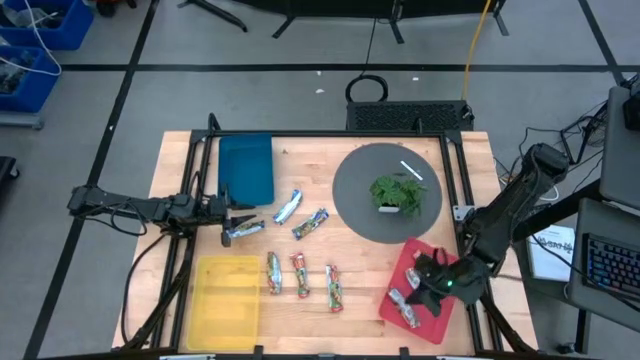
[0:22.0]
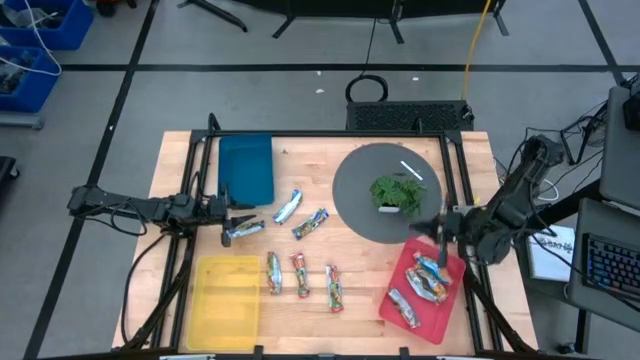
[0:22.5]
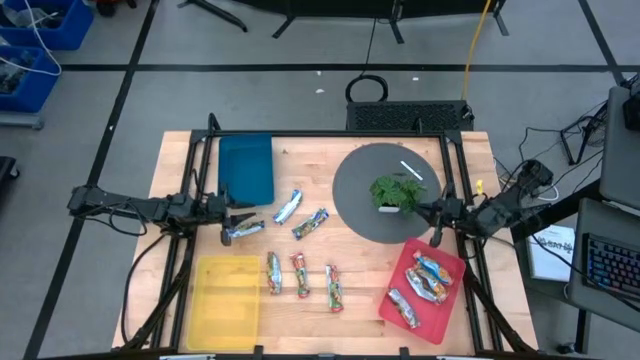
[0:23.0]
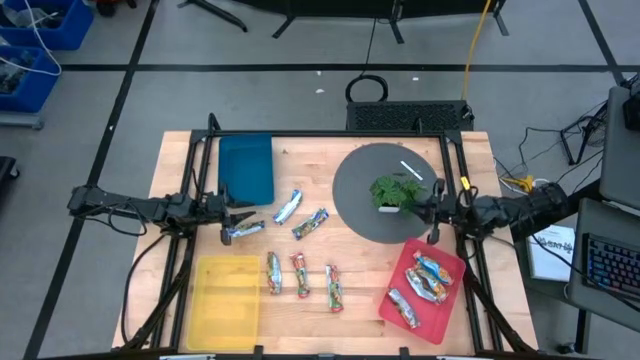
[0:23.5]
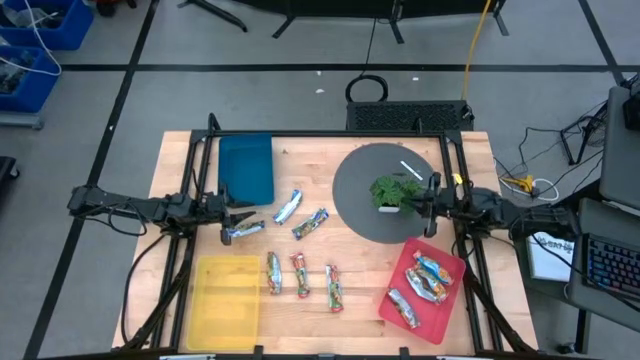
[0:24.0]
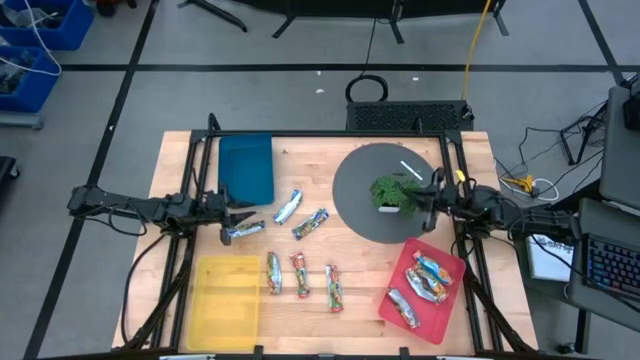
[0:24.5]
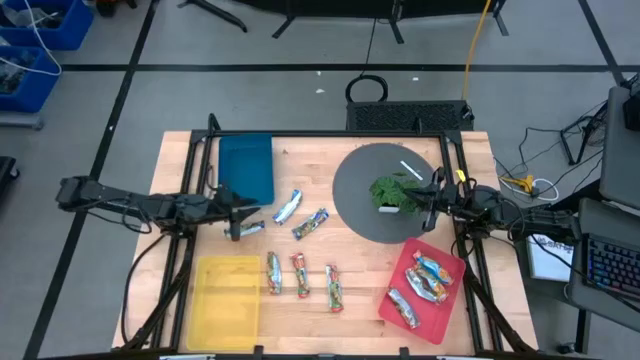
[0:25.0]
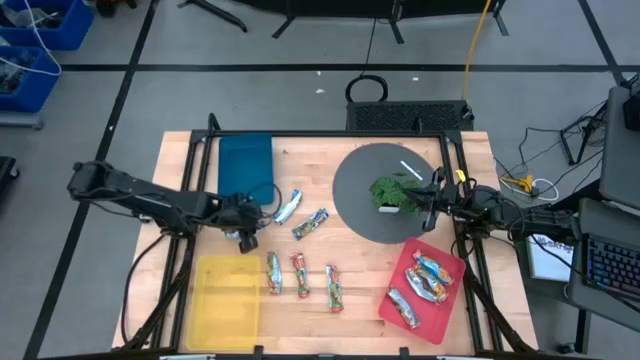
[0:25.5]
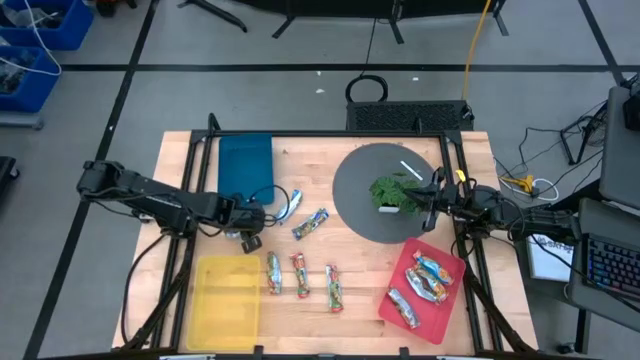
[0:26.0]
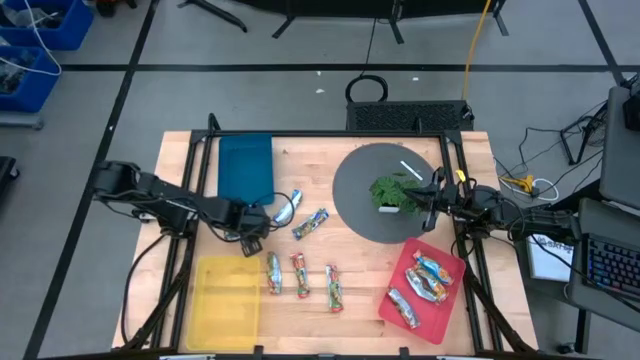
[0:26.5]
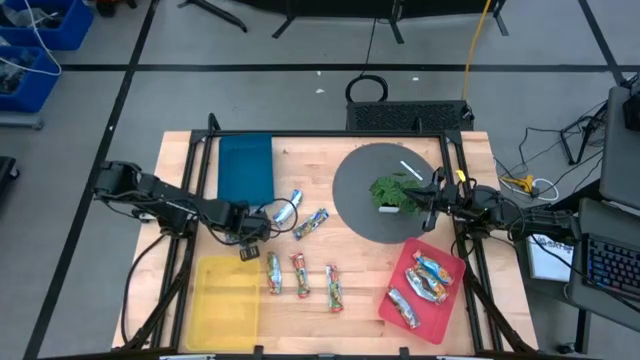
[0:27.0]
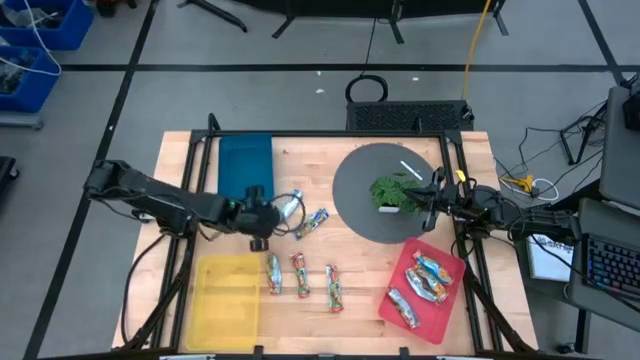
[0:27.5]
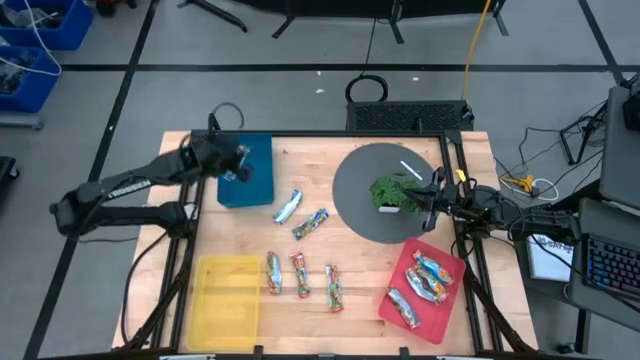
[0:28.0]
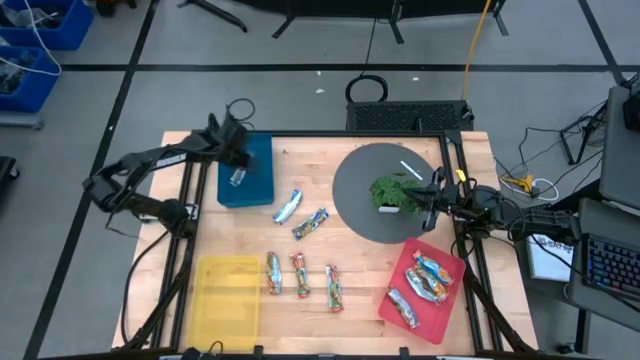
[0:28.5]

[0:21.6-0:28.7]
Task: Pick and place Granola Bars by type
Put the blue granola bar into the blue bin

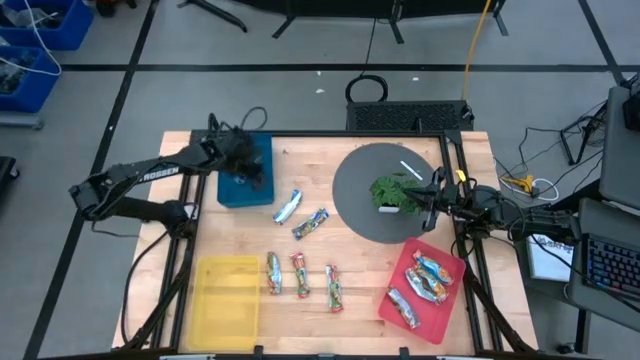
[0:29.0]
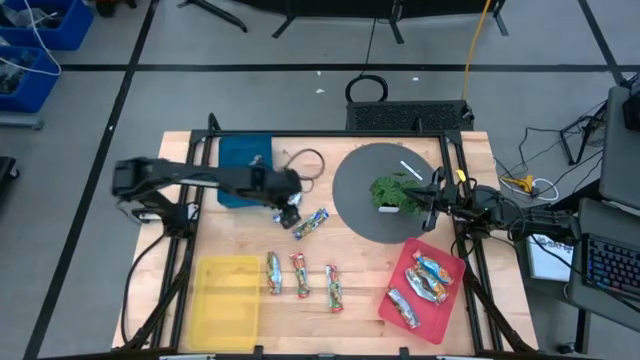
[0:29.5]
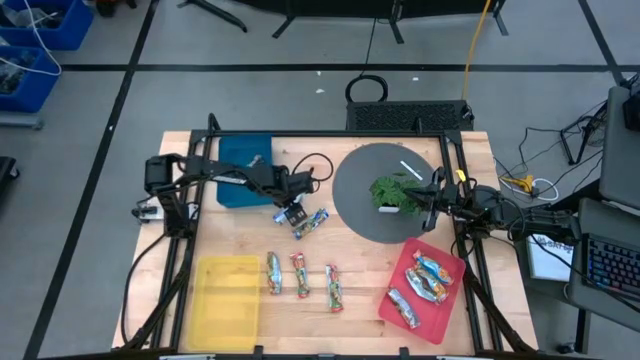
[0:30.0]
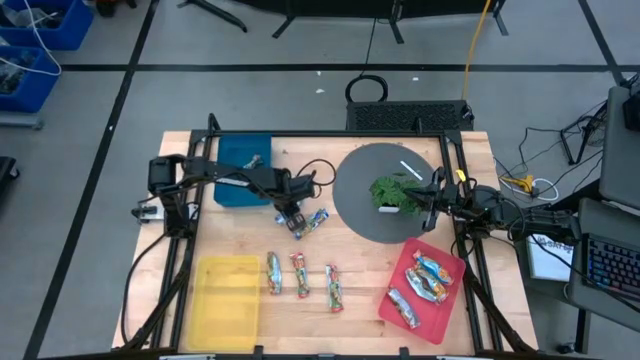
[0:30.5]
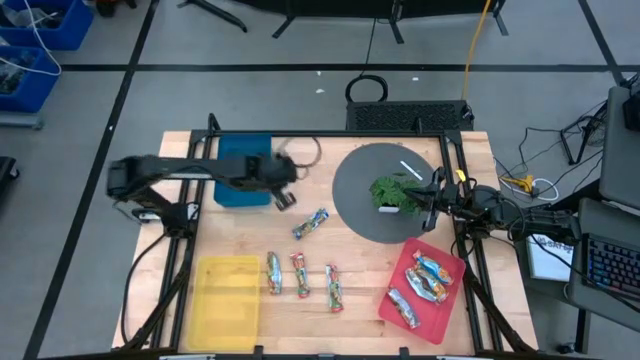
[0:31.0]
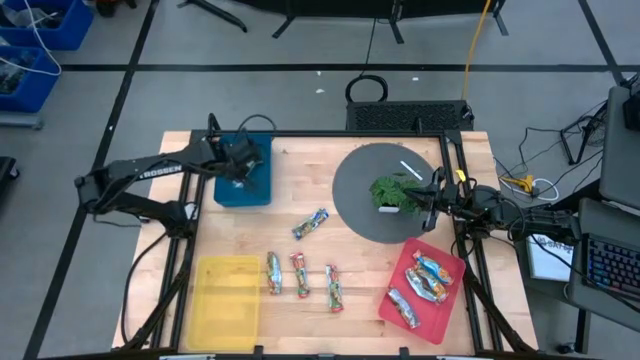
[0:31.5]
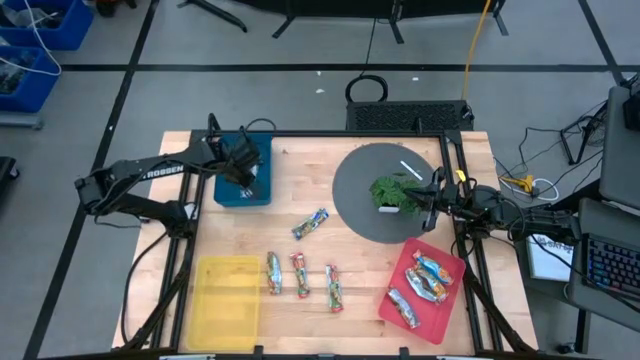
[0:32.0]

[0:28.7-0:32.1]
Put the blue granola bar into the blue bin

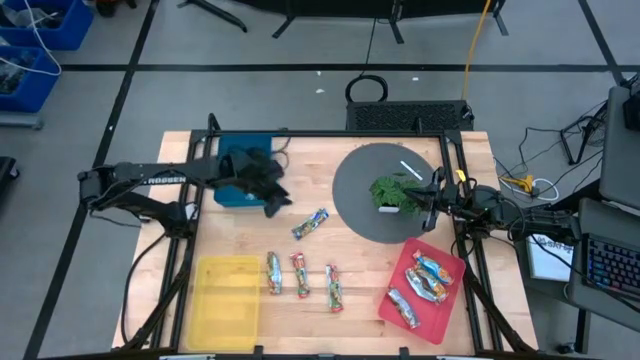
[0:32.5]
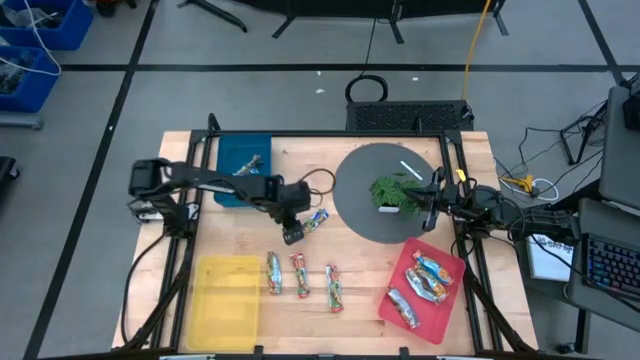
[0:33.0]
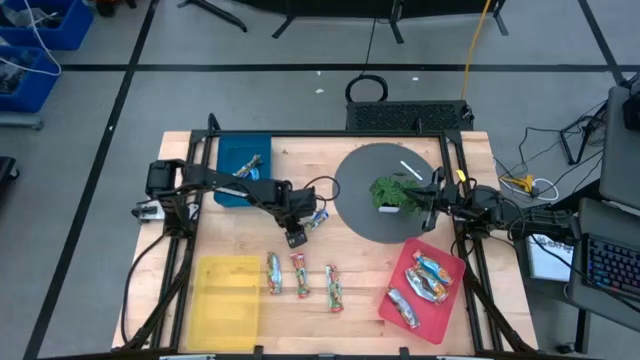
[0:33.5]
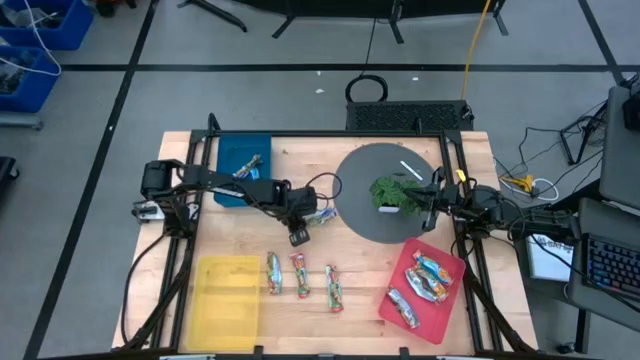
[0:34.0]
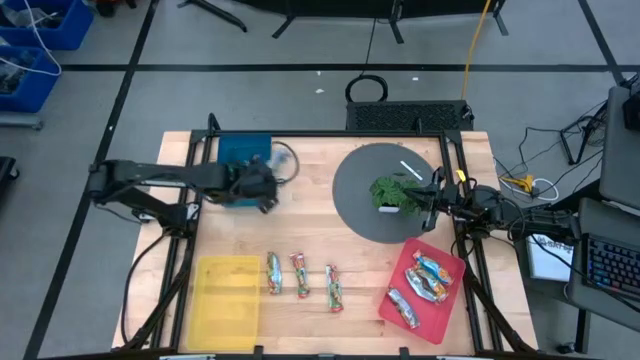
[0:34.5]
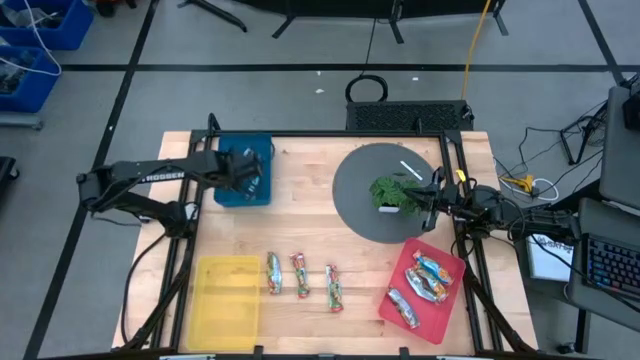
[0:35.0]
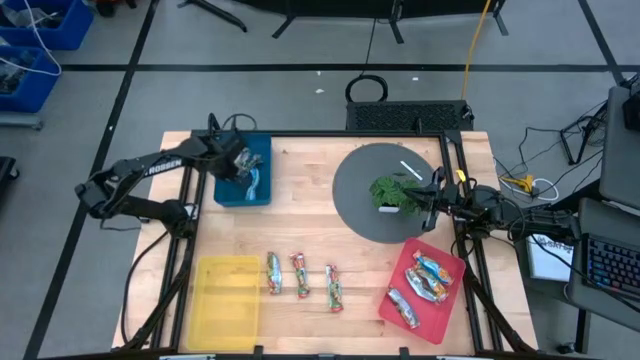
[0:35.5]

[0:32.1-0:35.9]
Put the blue granola bar into the blue bin

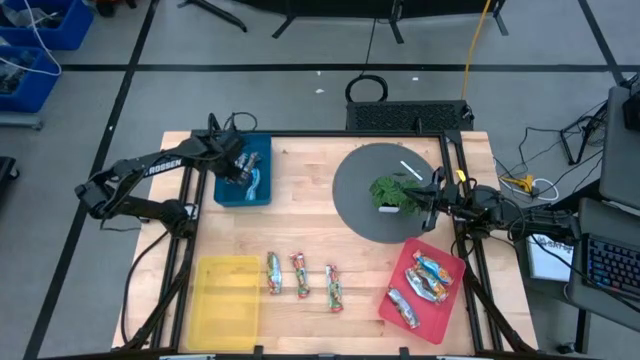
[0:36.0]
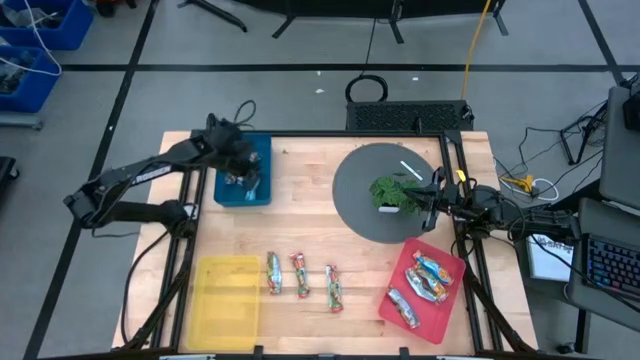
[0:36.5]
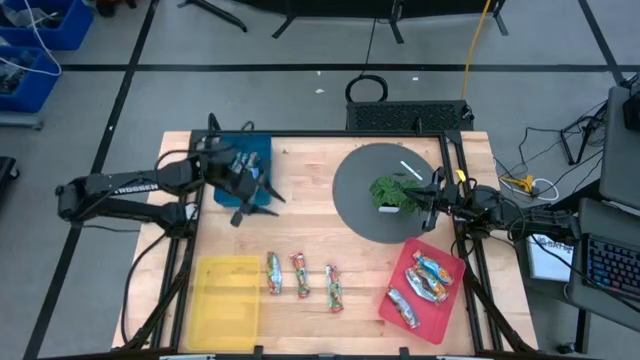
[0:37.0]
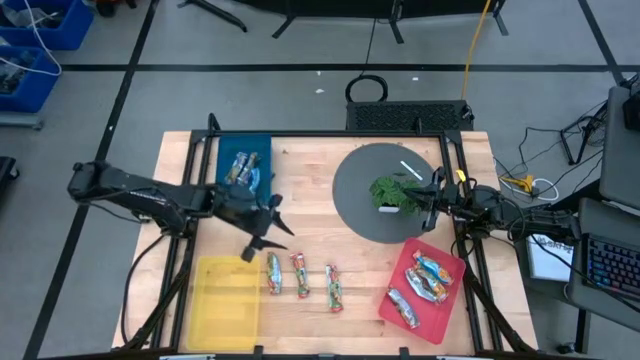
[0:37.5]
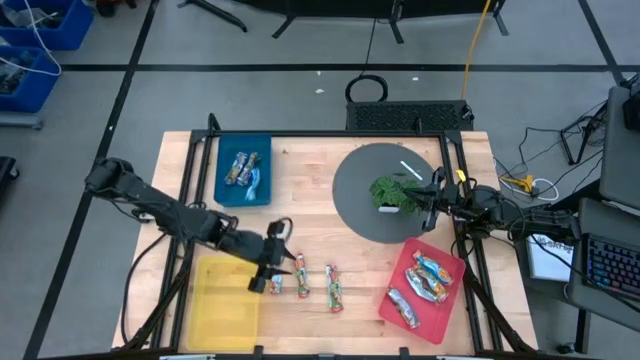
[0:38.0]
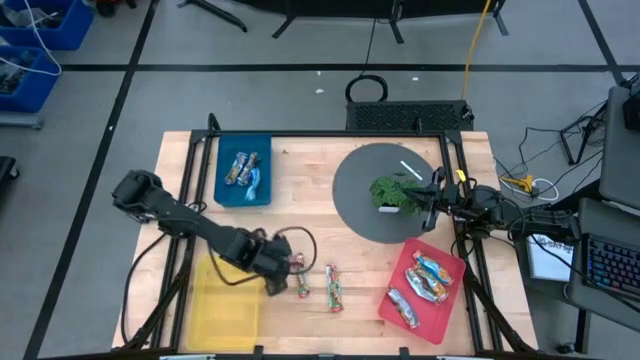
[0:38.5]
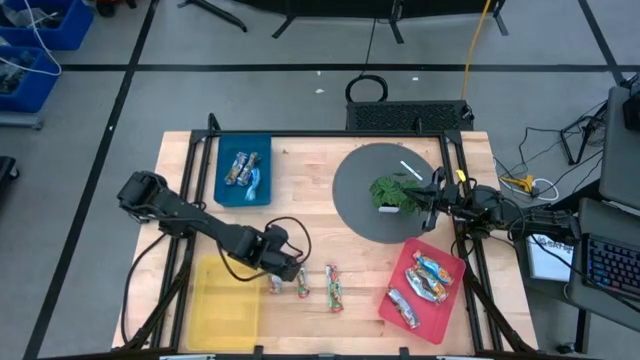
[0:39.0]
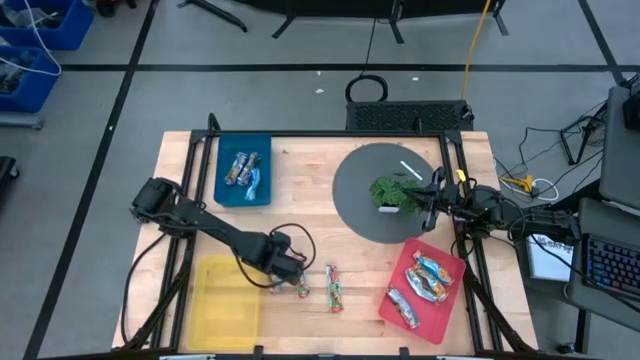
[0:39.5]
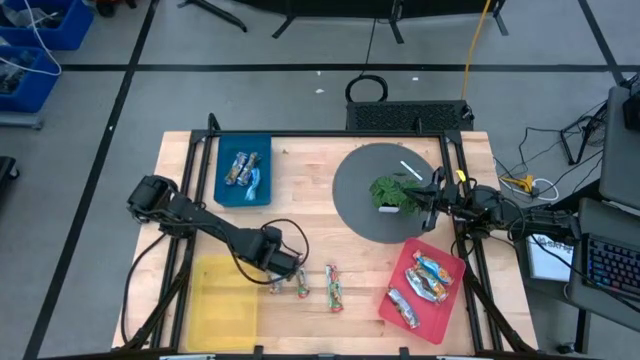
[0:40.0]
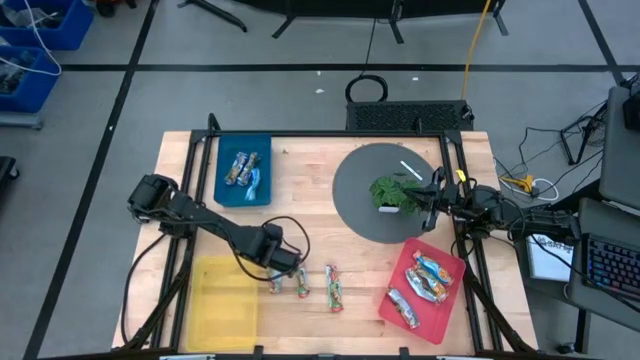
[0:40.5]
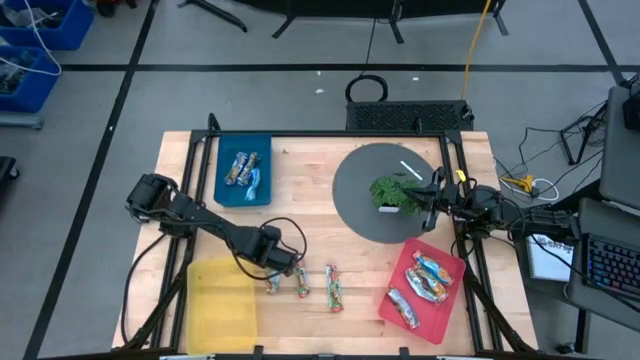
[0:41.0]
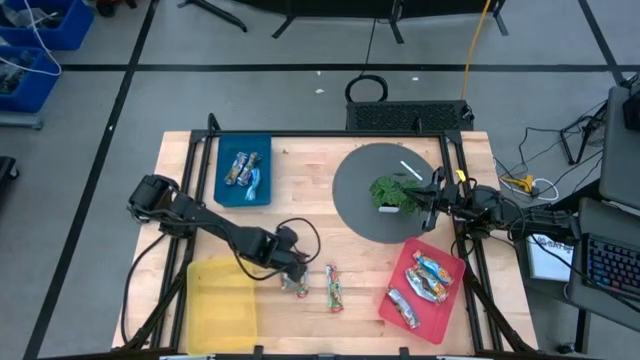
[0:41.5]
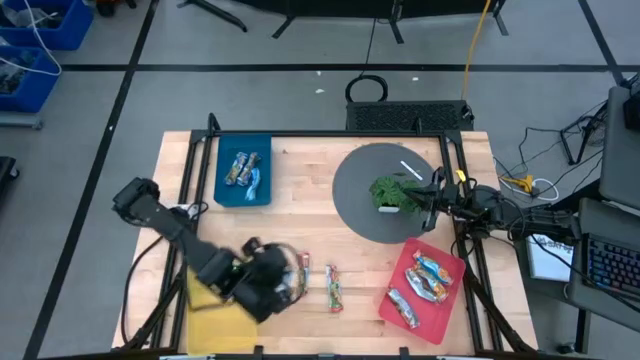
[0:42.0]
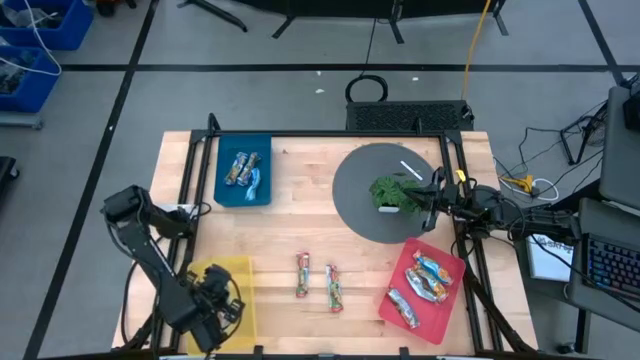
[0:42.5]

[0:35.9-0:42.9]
Put the red granola bar into the yellow bin

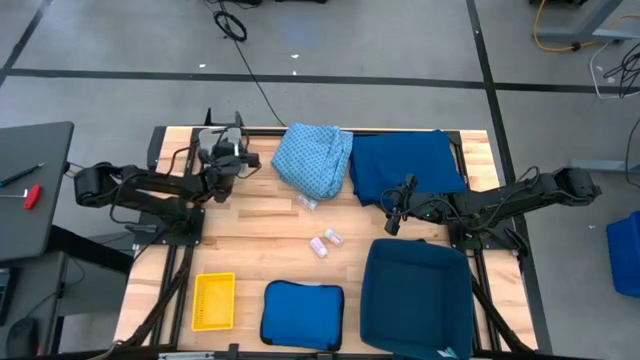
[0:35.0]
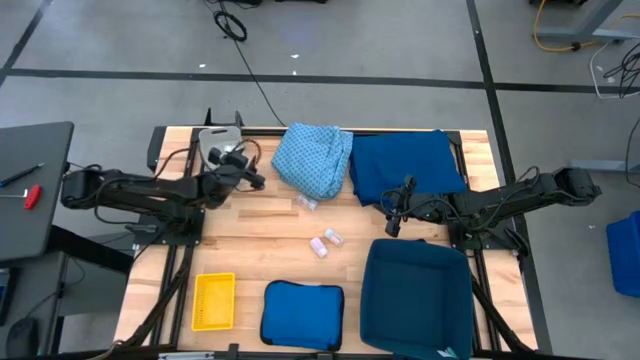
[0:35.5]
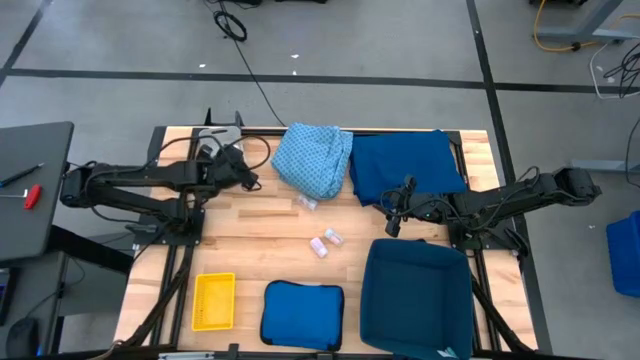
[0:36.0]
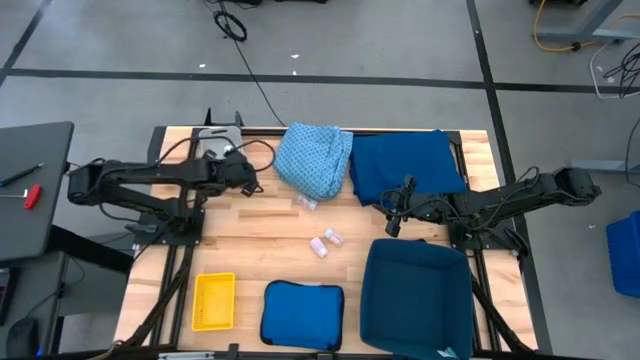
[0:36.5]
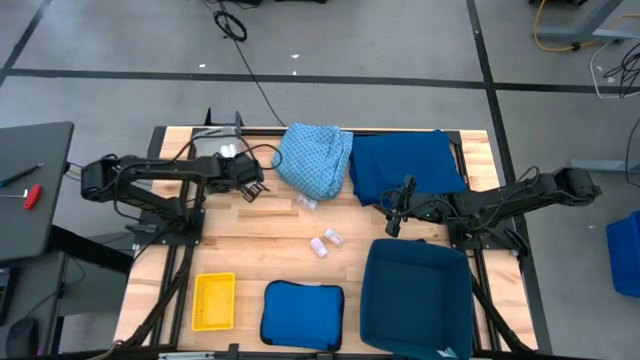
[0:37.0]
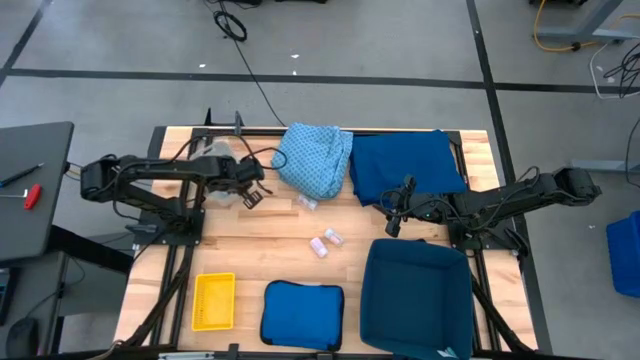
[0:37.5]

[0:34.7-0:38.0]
Task: Pick & place medical supplies in basket/bin
Adjust the gray bin
